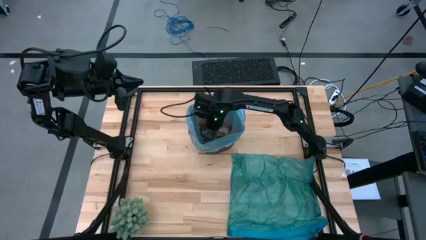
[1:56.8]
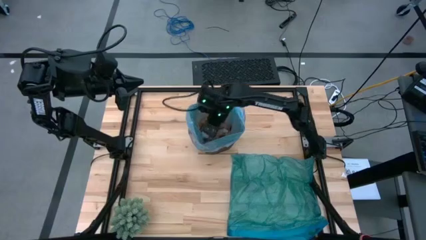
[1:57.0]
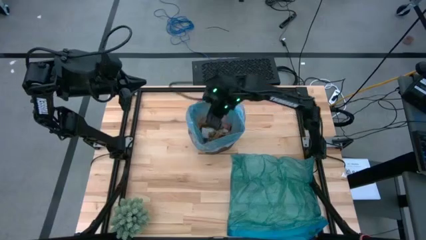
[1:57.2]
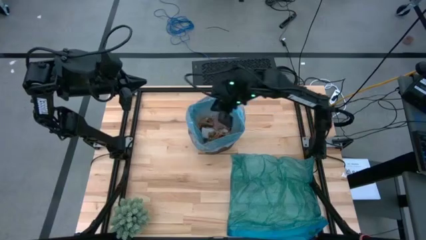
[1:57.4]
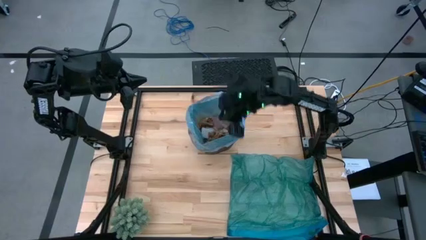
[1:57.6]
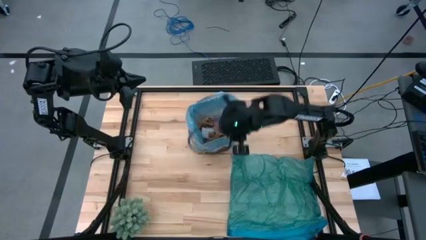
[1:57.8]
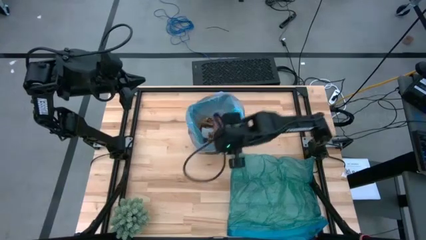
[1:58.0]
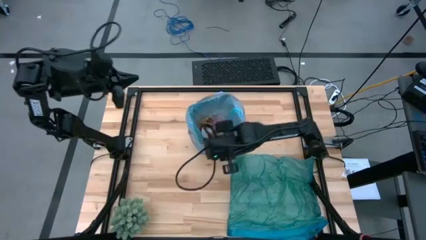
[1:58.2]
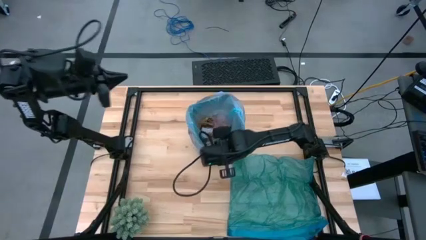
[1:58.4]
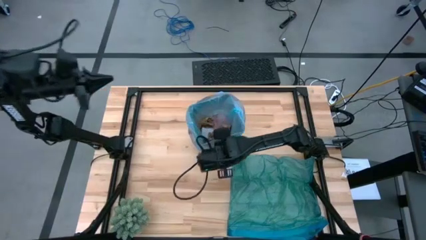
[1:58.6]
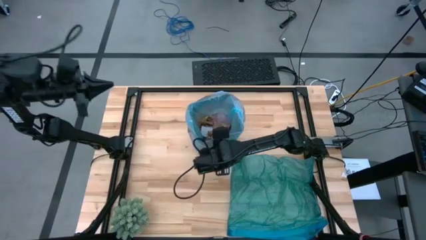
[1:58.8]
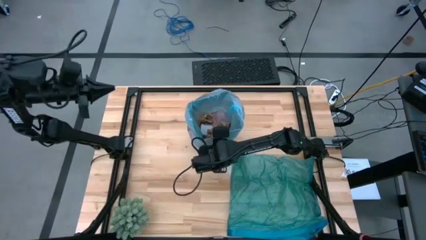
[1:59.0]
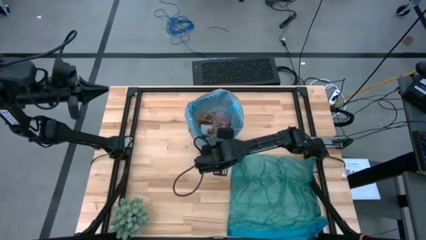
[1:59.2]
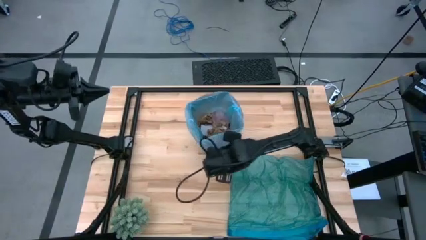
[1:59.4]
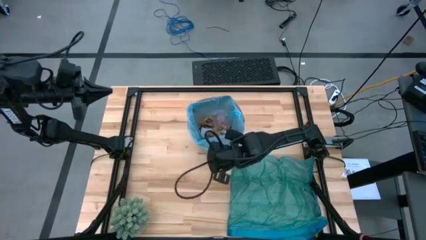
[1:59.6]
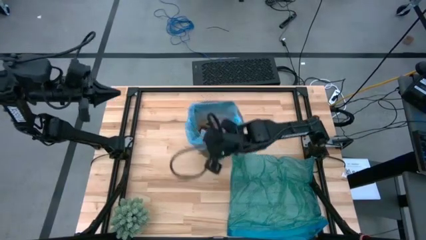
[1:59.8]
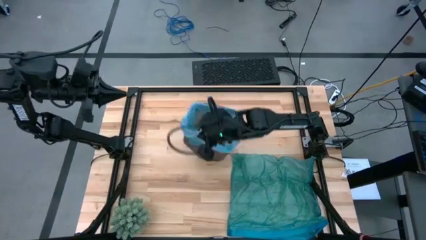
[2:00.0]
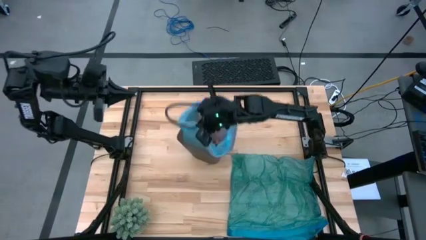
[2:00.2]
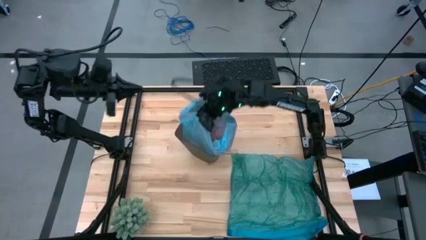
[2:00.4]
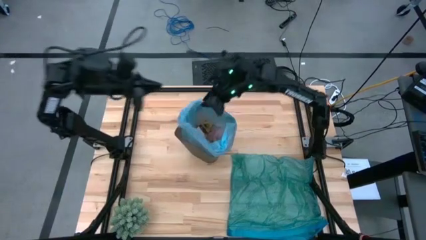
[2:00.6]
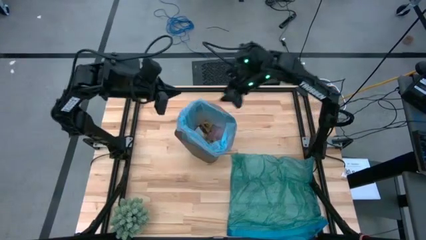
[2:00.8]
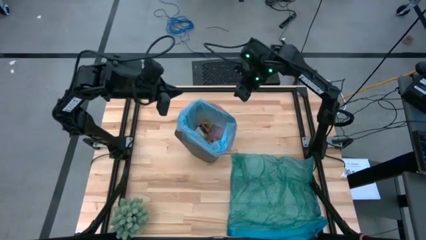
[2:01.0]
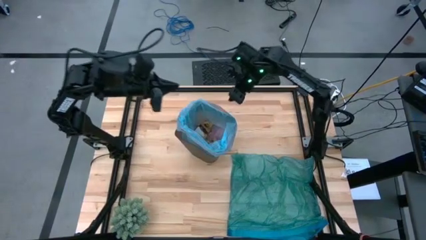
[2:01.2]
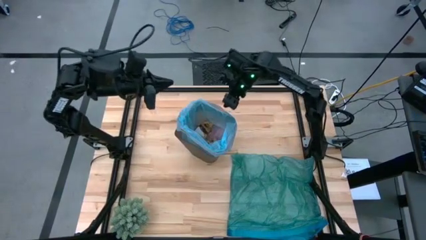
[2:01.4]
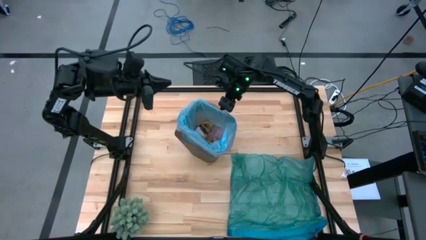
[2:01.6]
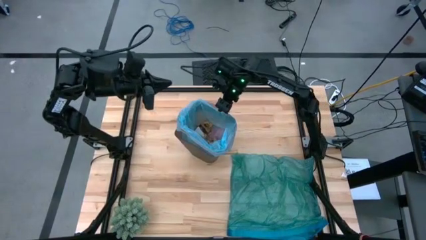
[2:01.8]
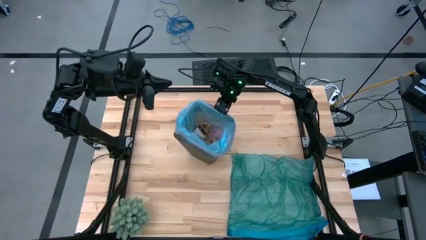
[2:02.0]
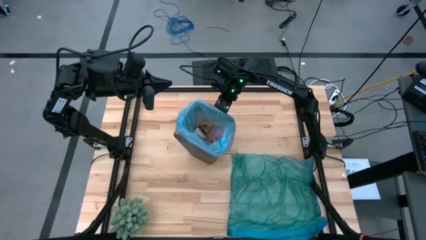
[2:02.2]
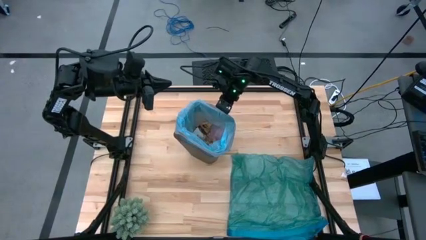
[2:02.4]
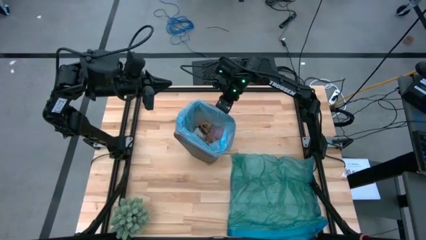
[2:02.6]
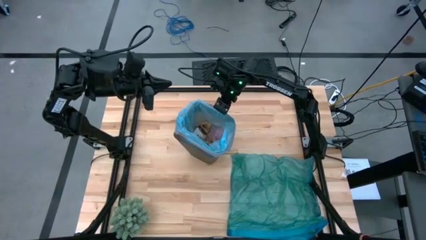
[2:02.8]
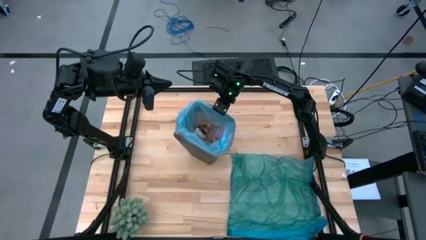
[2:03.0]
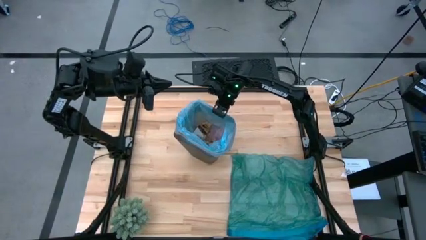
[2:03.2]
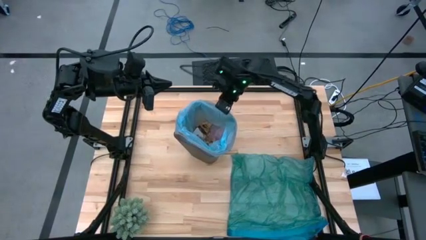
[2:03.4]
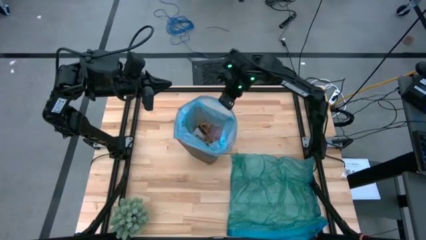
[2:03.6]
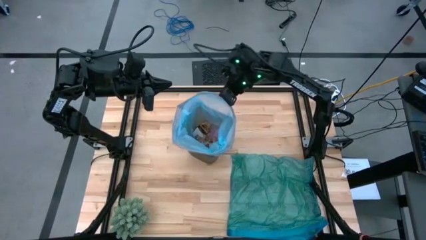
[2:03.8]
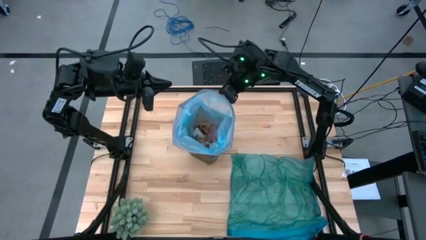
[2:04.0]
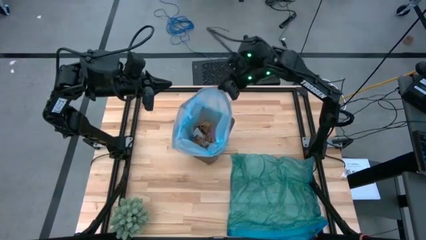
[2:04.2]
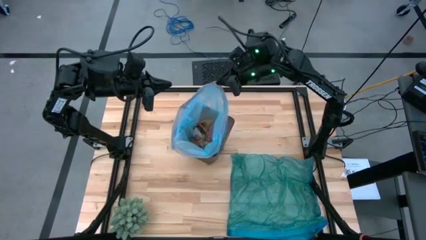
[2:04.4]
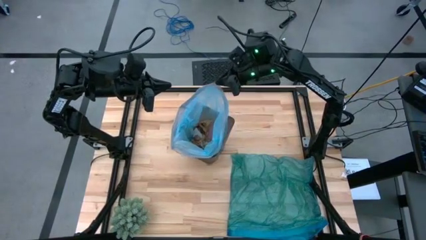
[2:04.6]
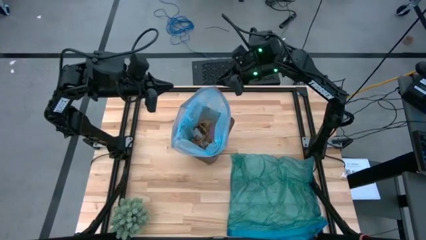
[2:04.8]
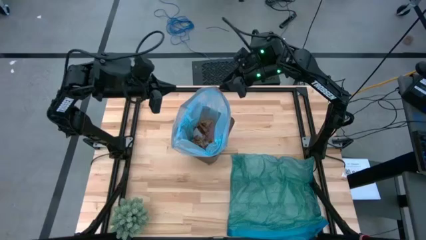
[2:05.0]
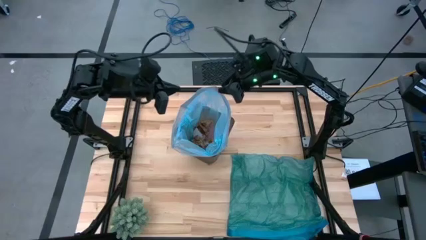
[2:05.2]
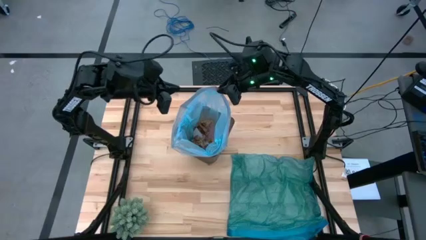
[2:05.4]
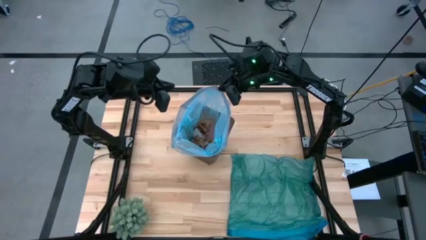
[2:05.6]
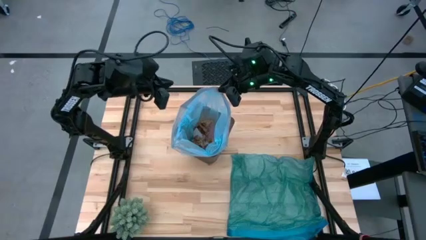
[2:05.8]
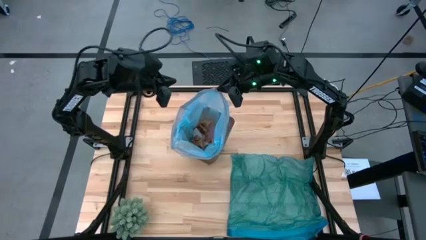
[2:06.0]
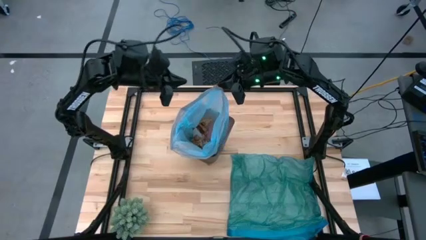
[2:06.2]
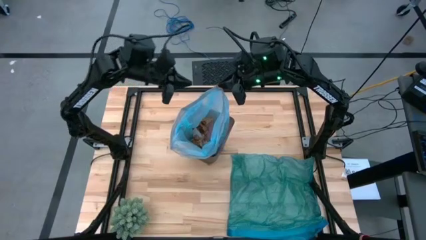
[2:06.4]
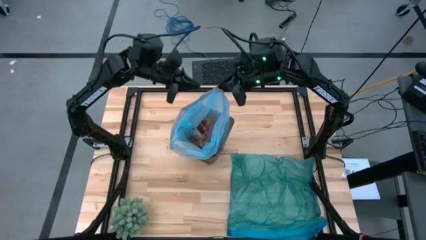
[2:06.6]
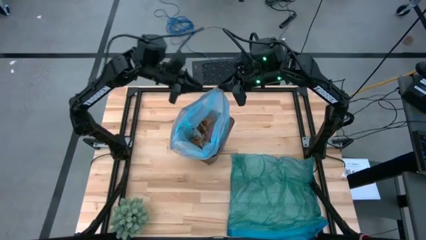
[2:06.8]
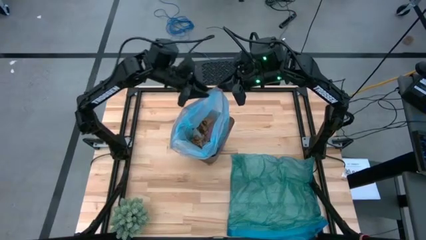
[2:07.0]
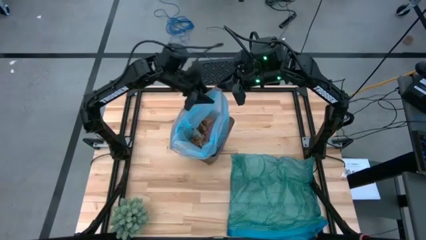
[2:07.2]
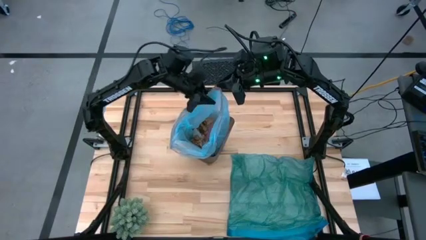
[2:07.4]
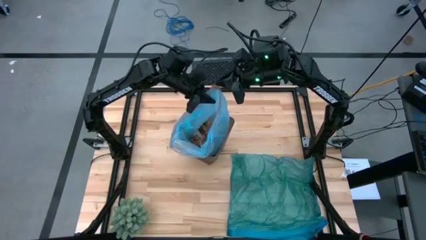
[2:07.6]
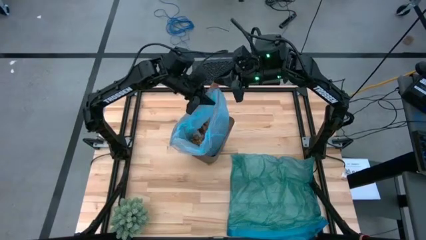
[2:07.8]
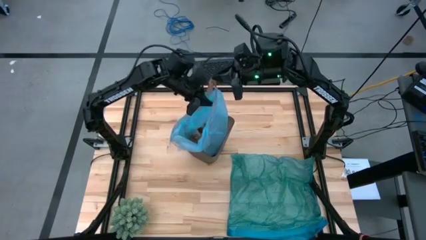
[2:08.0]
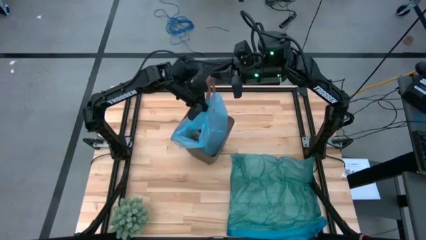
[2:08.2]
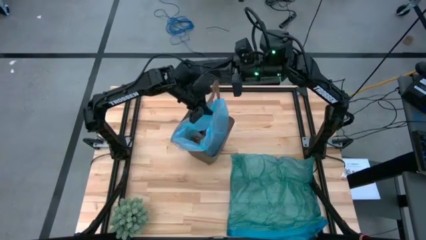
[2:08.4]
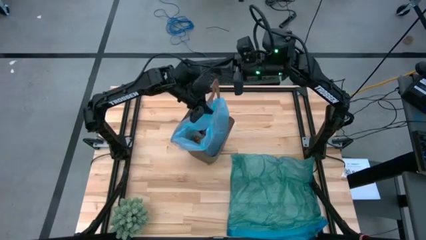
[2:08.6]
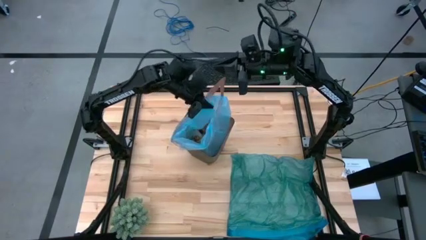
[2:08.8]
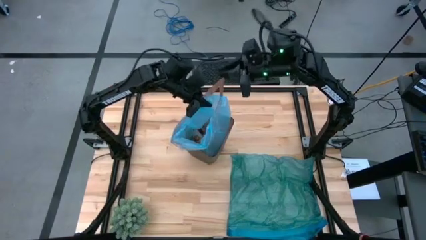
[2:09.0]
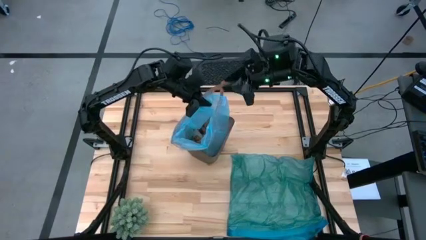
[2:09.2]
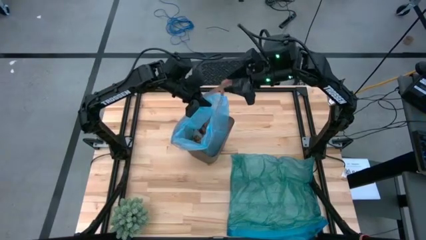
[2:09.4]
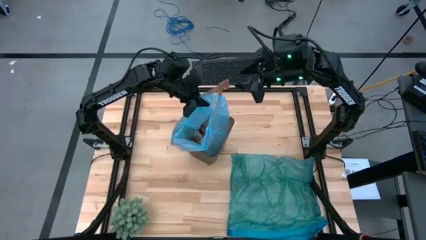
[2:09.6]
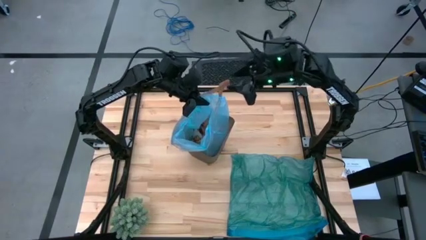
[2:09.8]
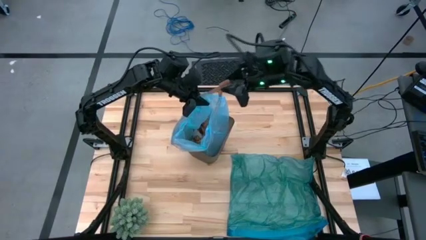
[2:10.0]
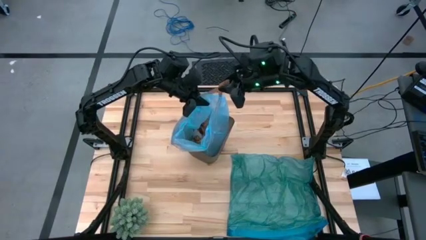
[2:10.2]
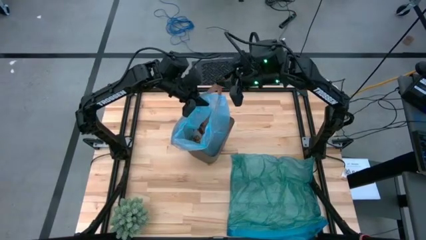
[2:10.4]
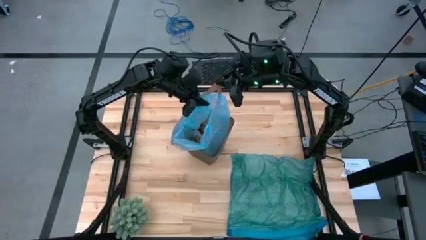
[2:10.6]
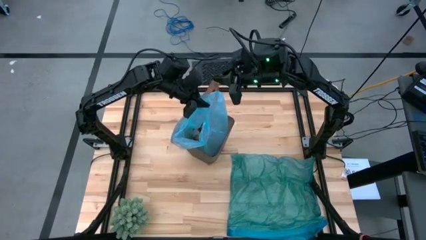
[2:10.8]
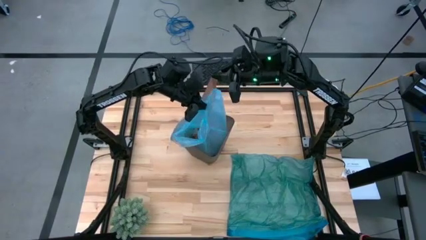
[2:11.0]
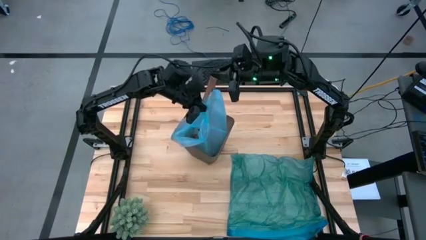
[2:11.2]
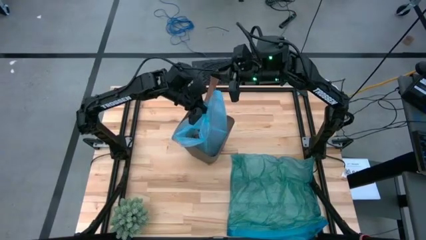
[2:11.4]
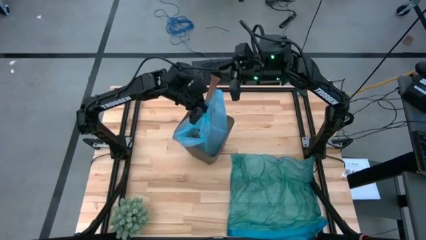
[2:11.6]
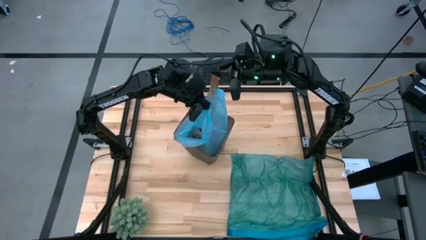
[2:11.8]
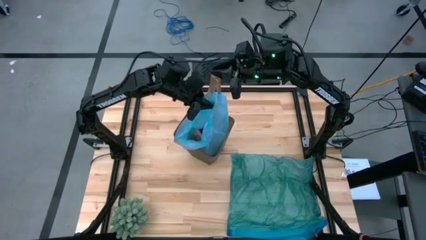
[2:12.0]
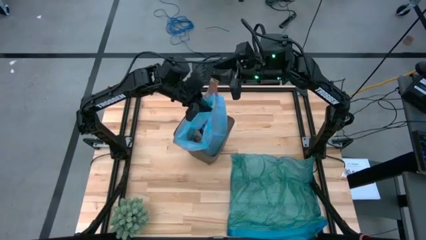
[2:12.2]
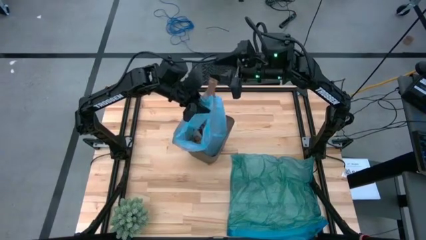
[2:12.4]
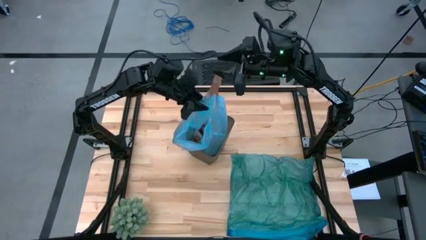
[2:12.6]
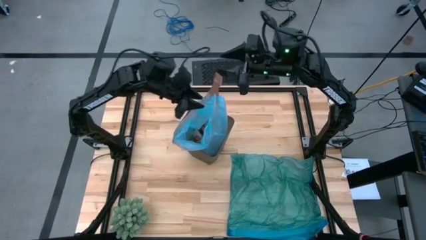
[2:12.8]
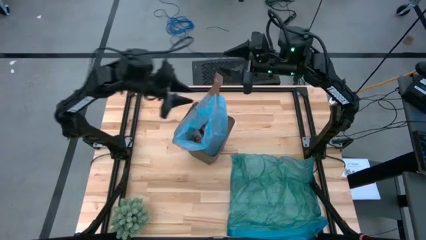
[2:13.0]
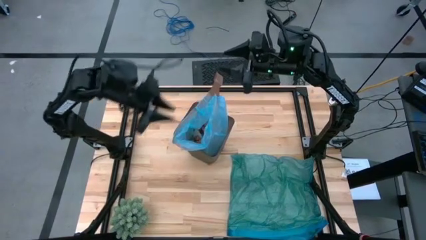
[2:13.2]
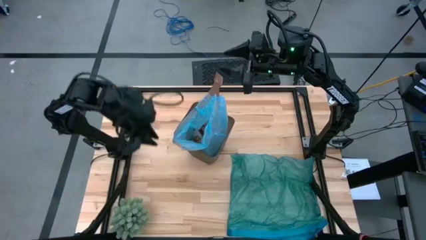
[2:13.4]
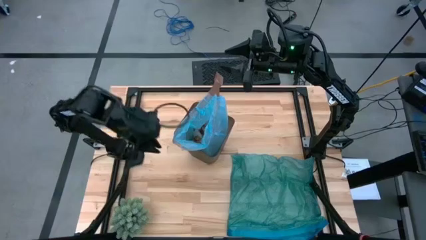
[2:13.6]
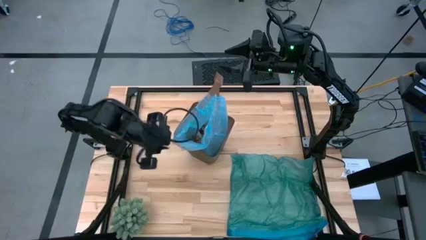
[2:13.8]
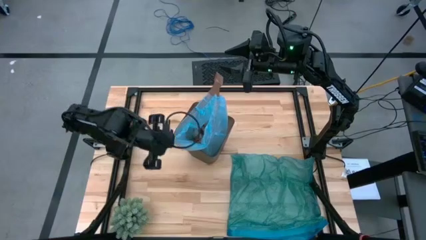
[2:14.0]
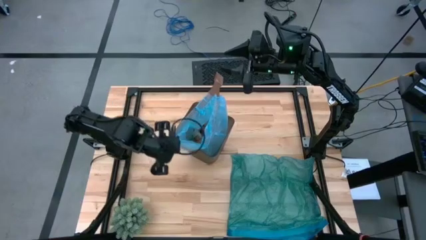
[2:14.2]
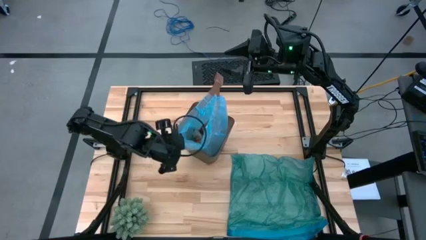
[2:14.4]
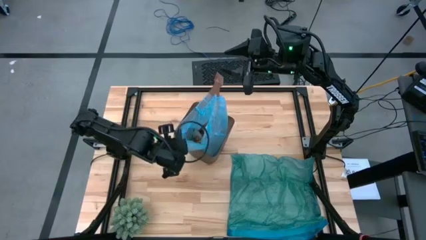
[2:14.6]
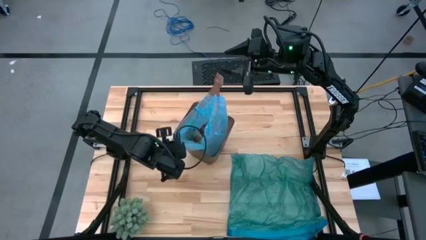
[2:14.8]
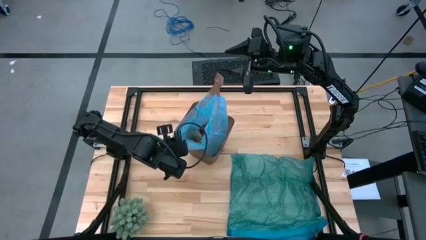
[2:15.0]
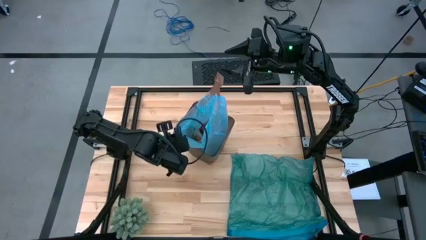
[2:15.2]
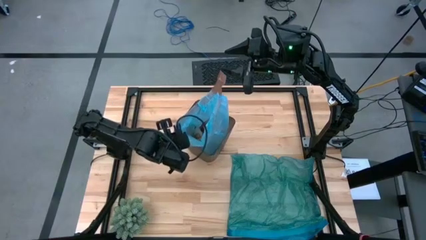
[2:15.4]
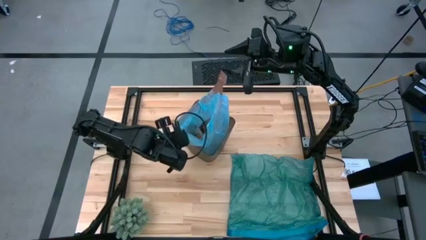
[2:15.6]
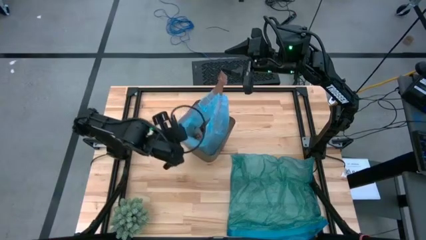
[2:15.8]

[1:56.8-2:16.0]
Task: place trash/remove bag and relplace
Remove the light blue trash bag from the black trash bin
